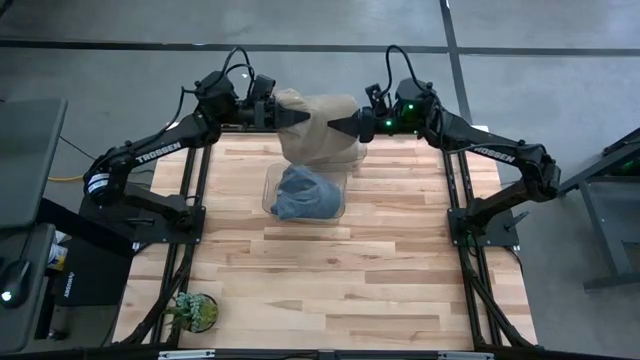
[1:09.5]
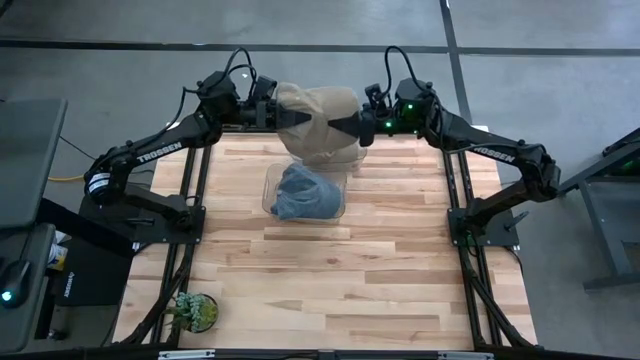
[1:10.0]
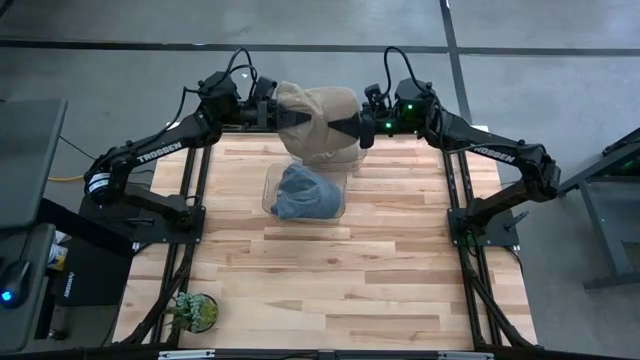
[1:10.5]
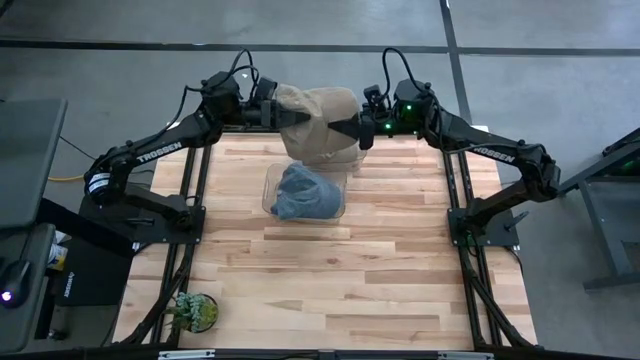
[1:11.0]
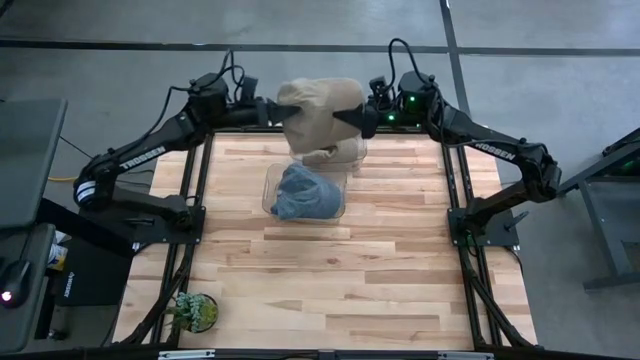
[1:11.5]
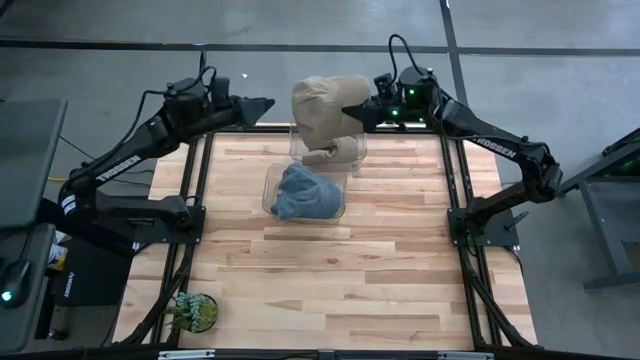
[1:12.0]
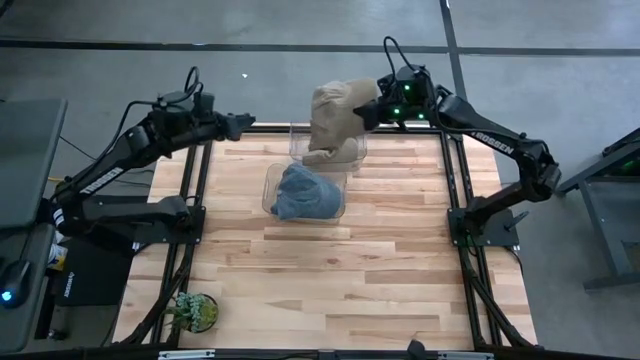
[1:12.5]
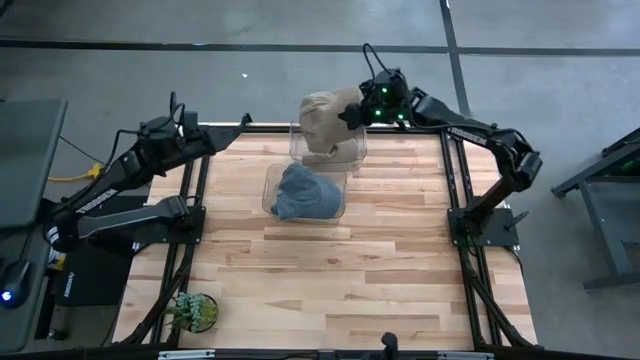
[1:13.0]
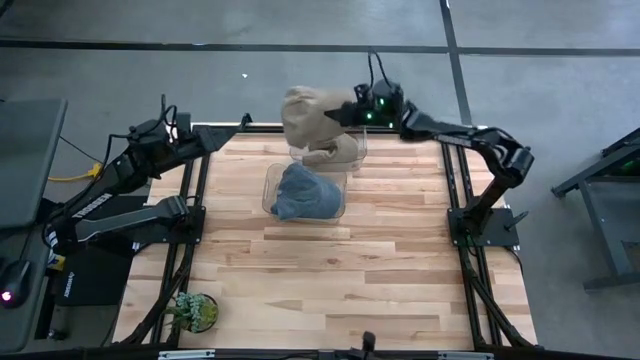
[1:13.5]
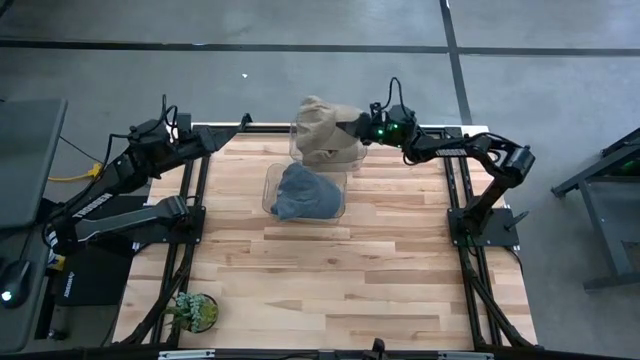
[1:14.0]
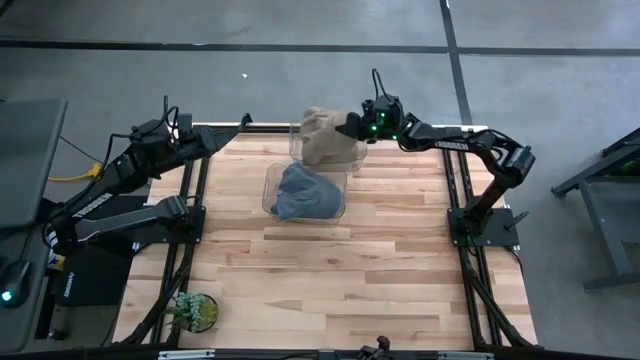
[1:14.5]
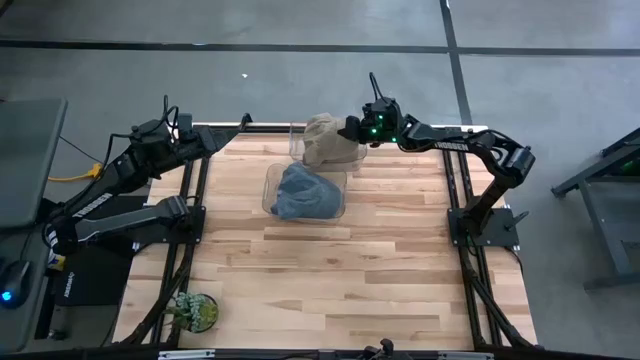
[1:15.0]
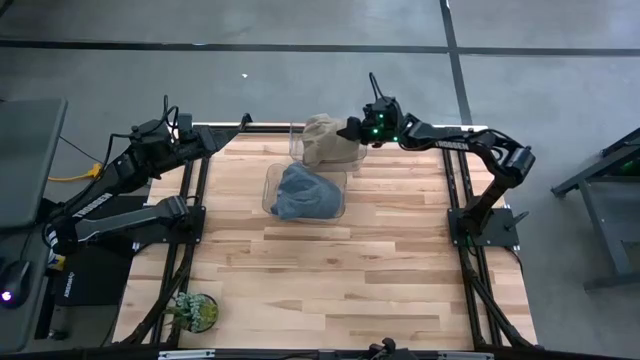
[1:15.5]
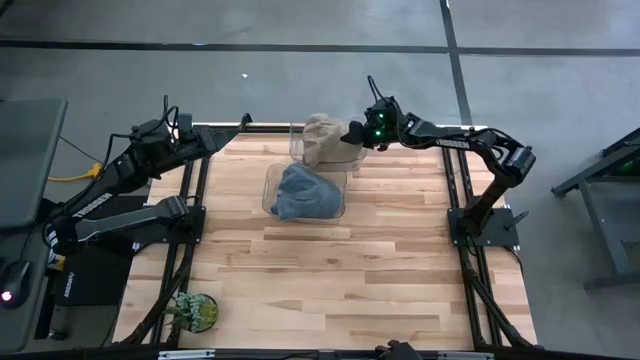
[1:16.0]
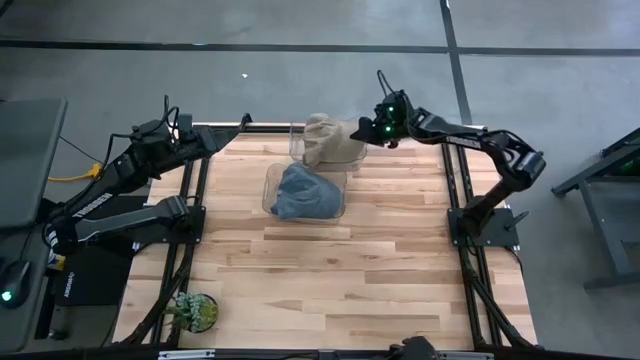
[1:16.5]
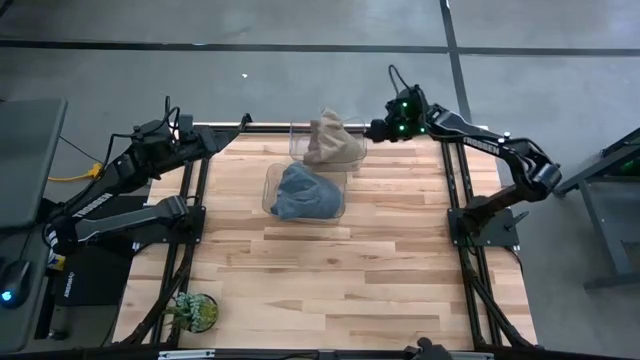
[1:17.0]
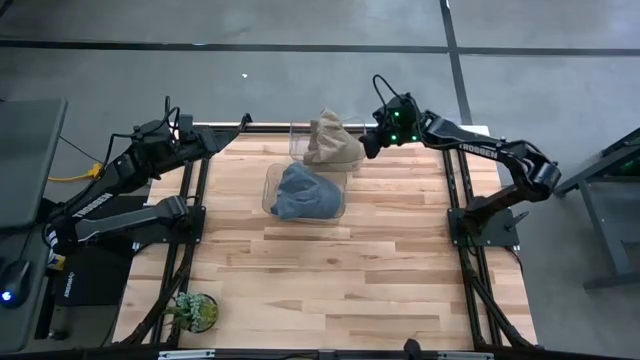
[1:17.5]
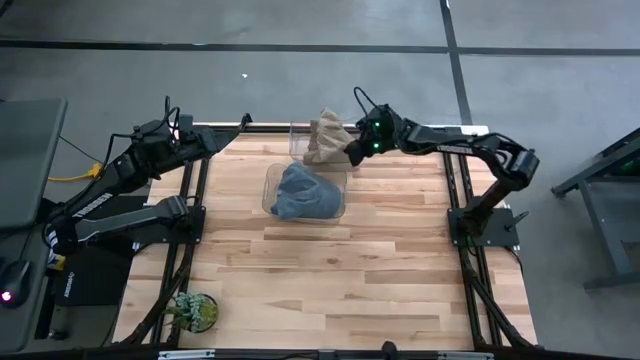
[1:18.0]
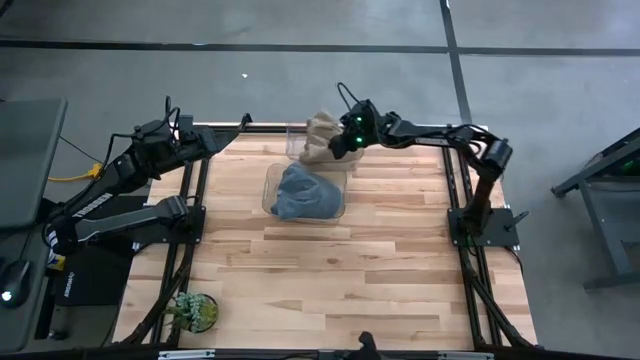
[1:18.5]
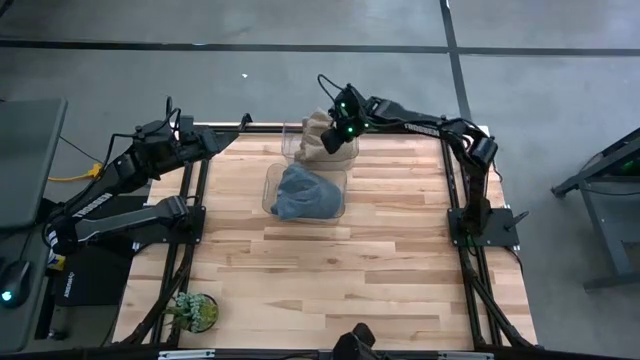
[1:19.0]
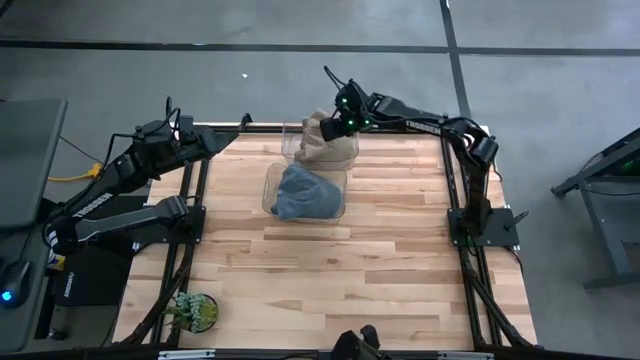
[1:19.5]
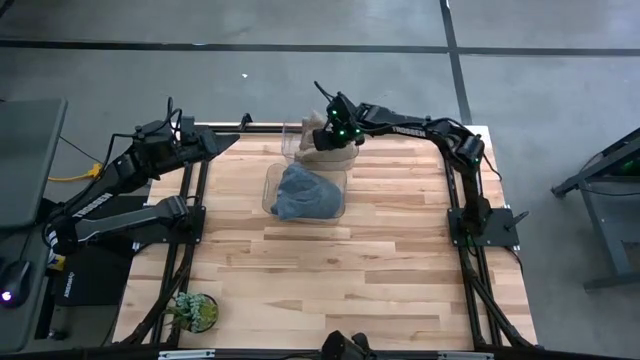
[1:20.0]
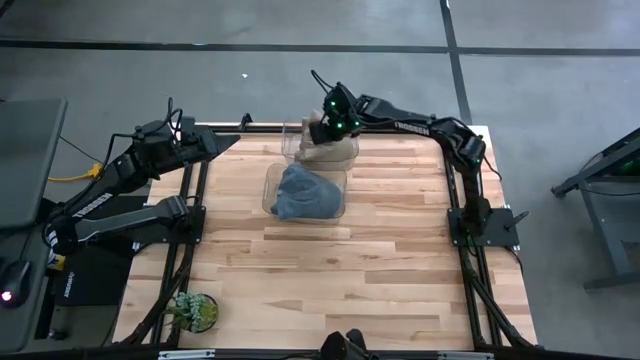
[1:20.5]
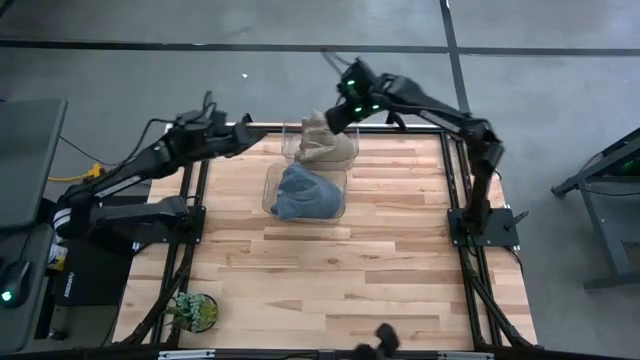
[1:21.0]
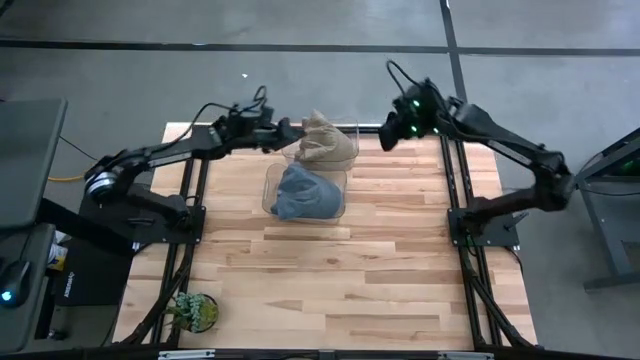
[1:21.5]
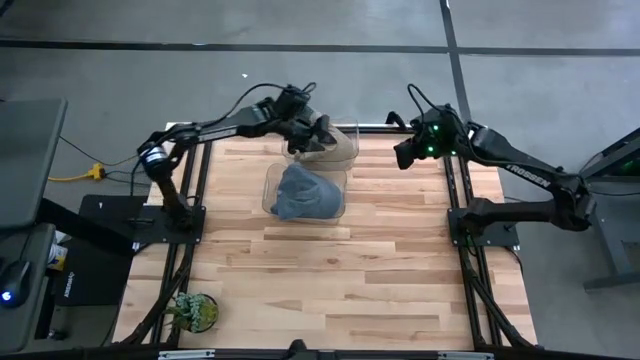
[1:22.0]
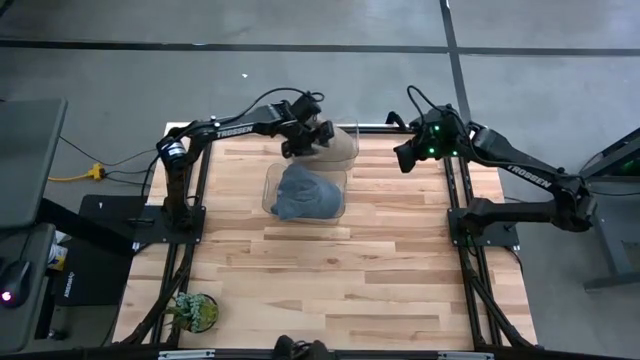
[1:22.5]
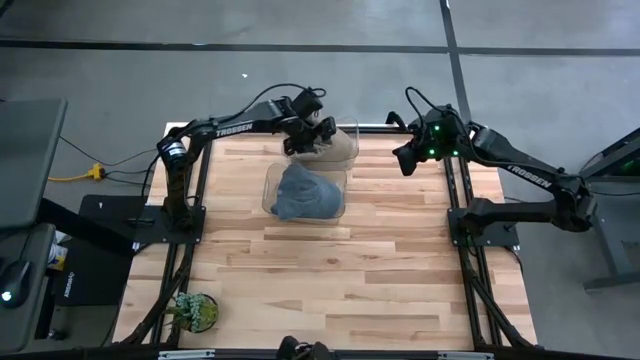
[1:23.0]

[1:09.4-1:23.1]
Task: Pick & Place hat
Put the brown cap into the top transparent bin

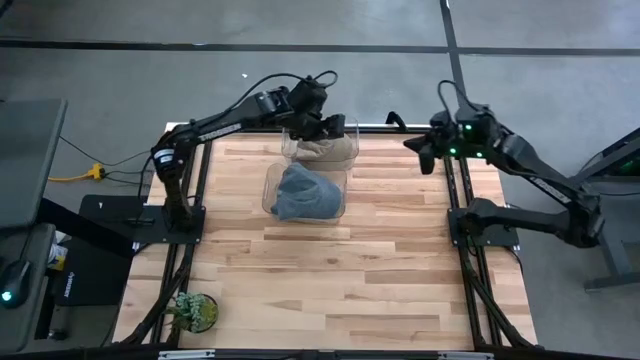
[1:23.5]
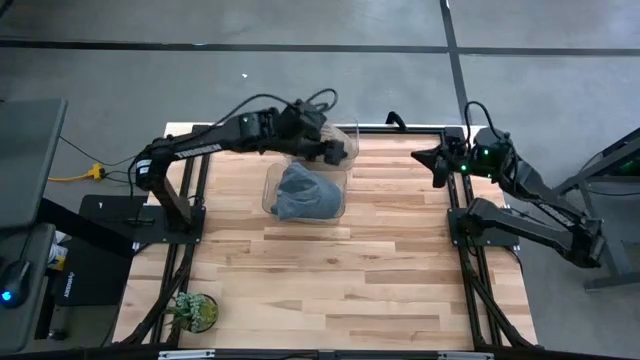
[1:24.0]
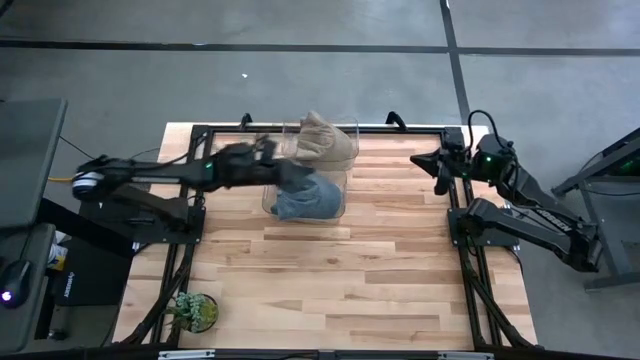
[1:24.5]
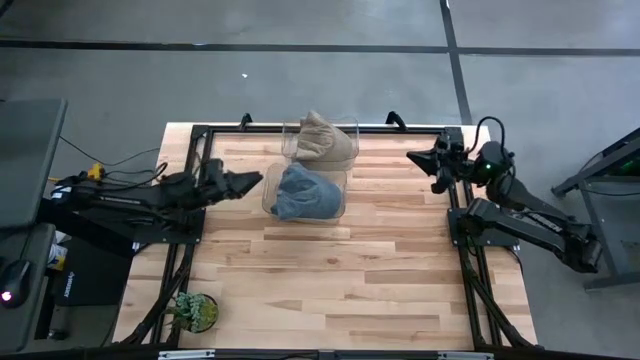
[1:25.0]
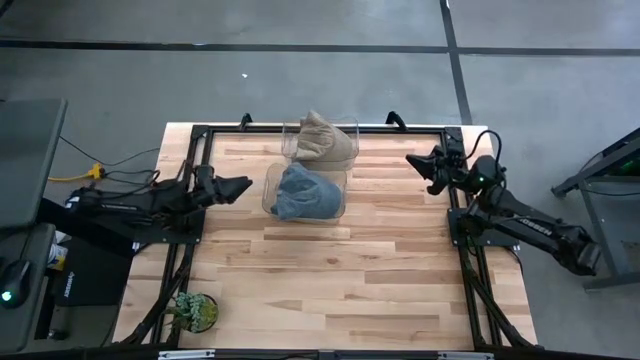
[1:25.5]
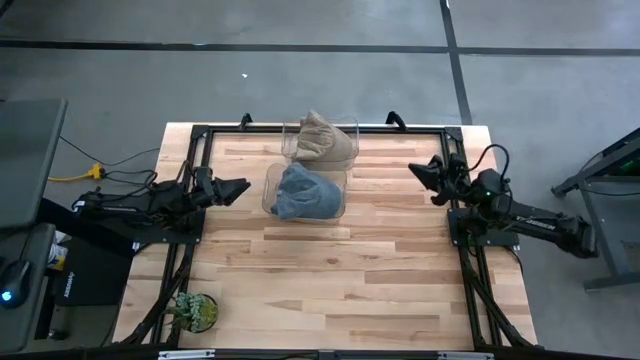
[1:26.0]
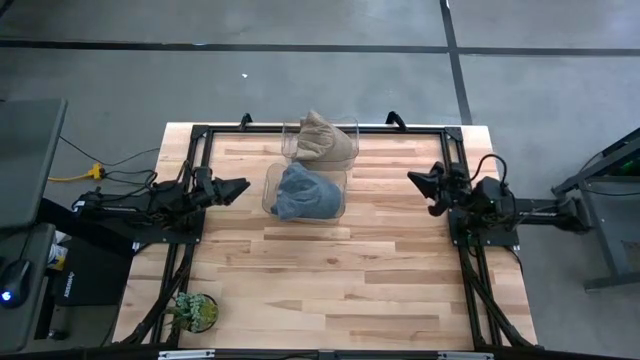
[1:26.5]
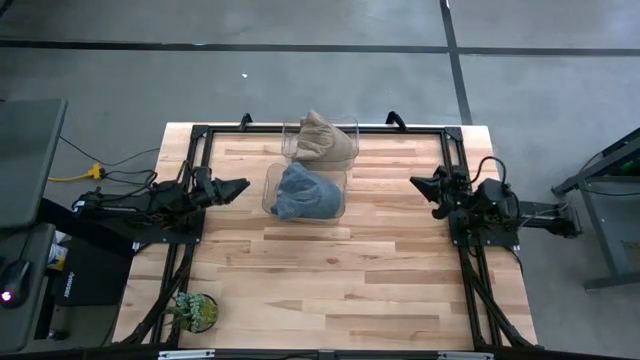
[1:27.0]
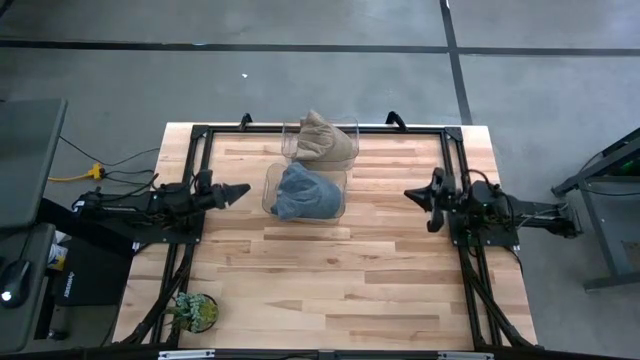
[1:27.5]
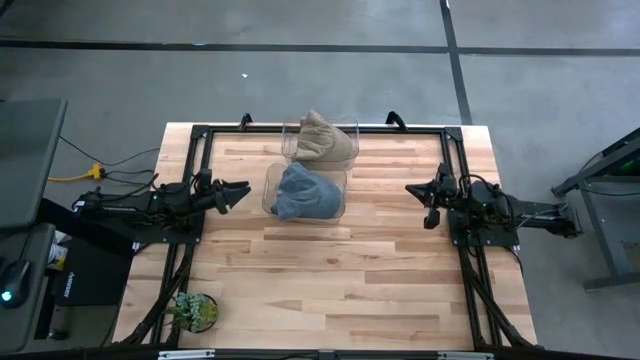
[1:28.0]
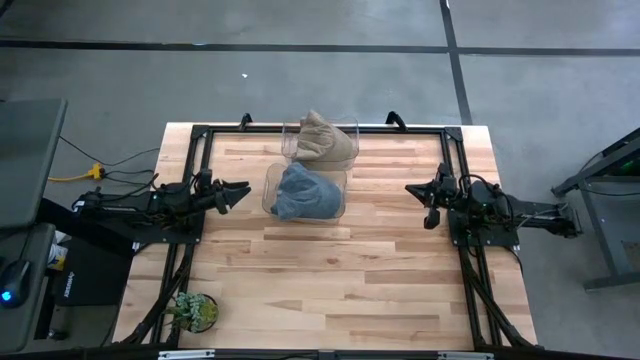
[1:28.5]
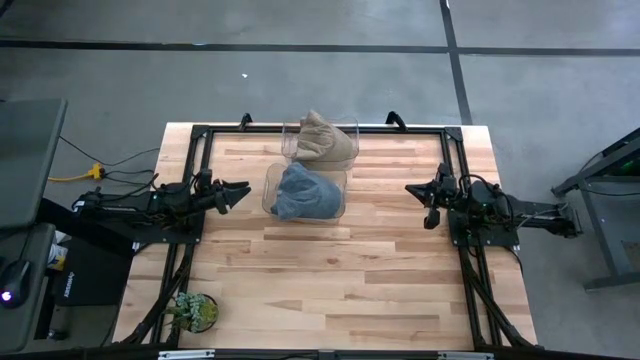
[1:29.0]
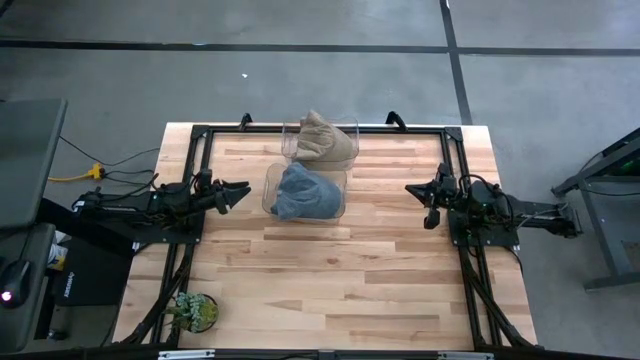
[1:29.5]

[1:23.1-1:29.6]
Return to Home Position

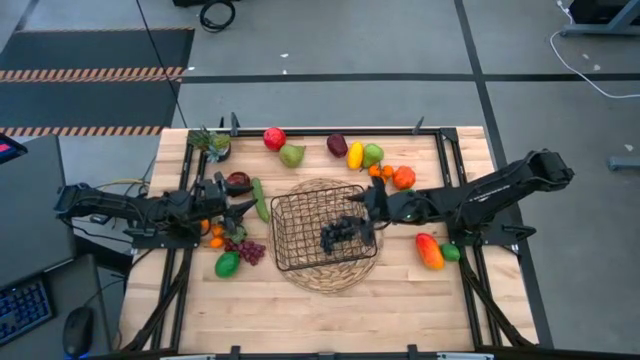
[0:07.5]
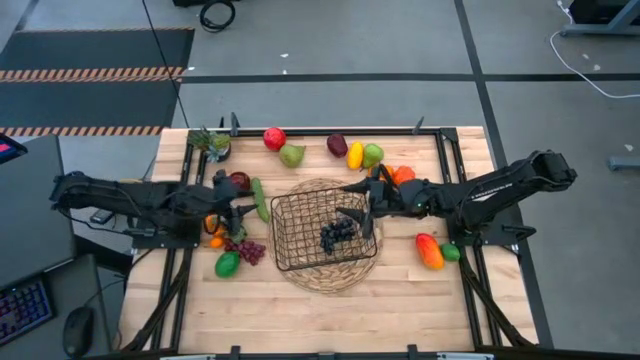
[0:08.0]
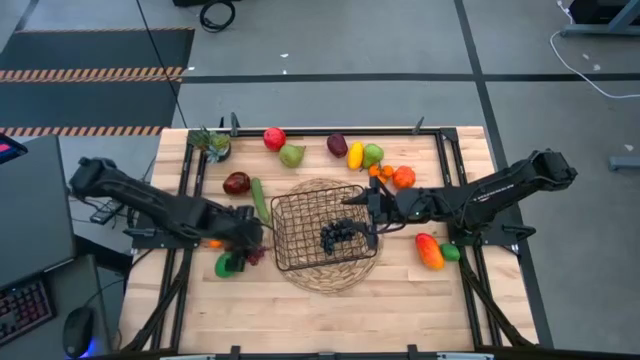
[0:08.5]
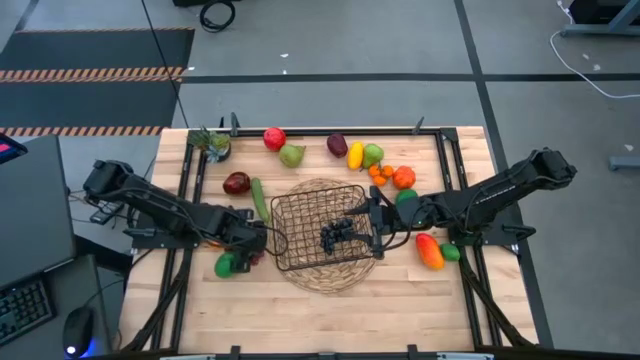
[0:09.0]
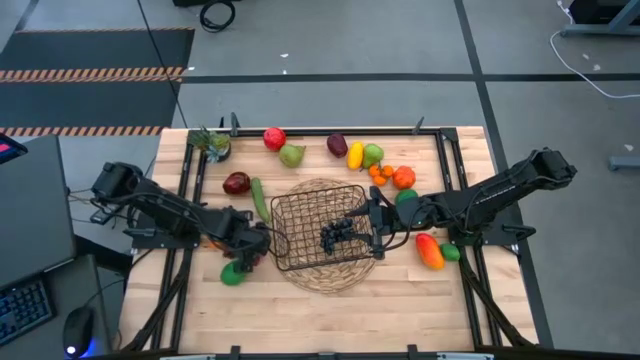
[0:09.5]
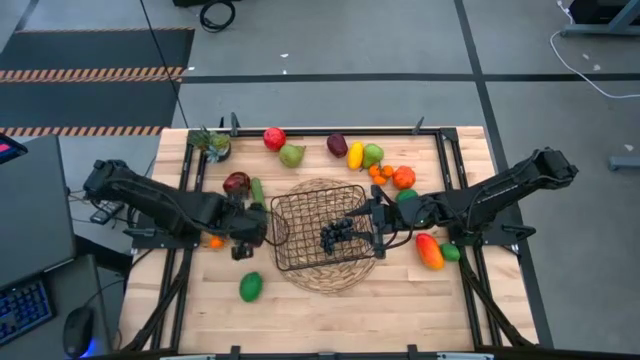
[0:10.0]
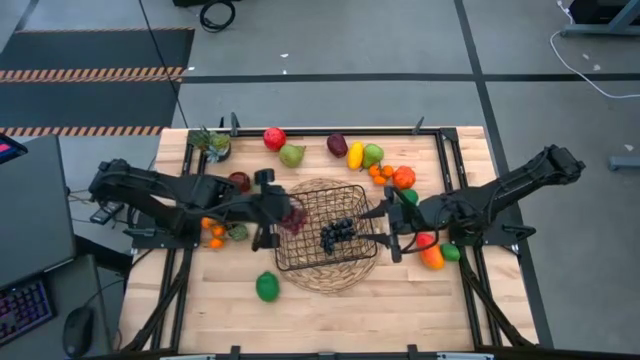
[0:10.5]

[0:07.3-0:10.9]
Task: Build produce basket
Put the purple grapes into the black wire basket
